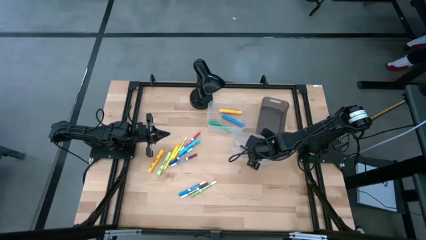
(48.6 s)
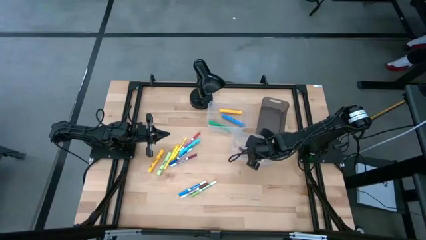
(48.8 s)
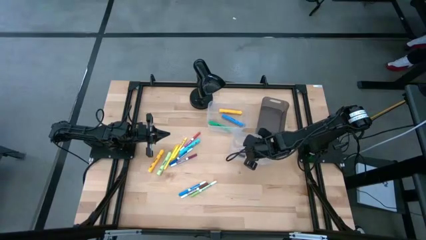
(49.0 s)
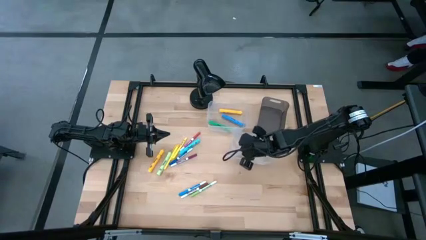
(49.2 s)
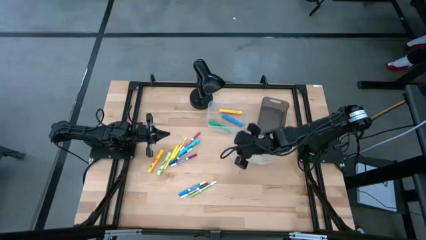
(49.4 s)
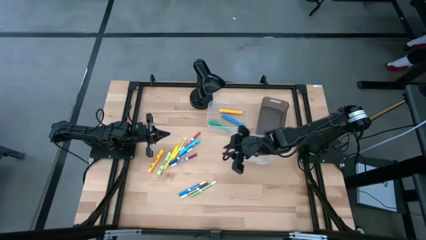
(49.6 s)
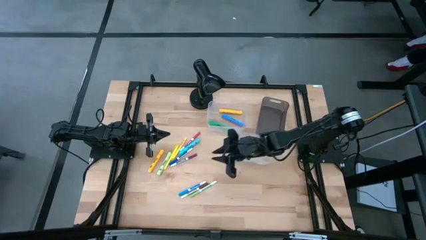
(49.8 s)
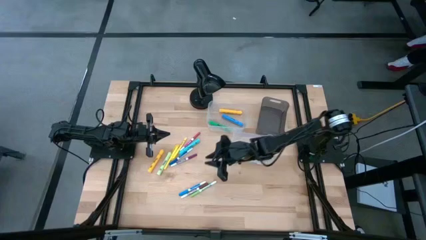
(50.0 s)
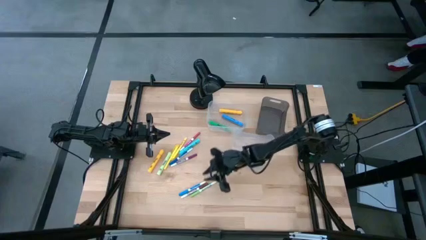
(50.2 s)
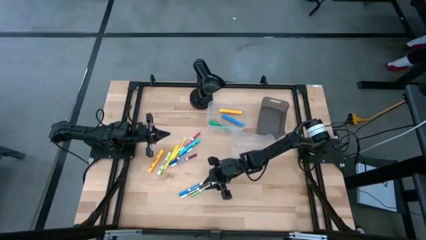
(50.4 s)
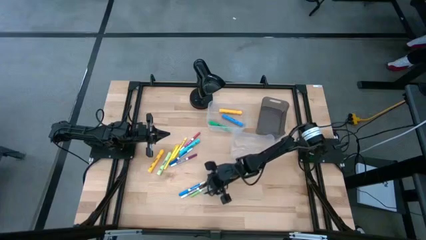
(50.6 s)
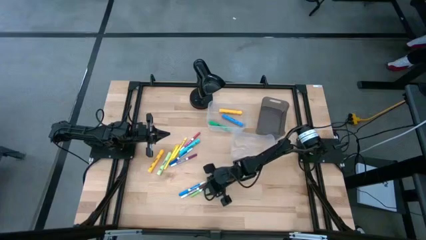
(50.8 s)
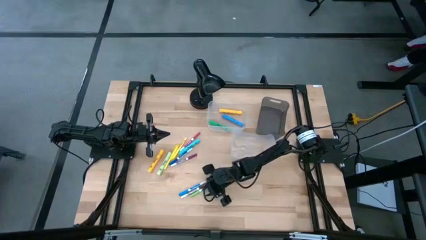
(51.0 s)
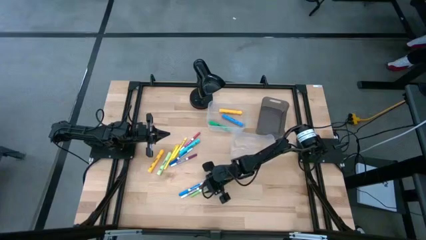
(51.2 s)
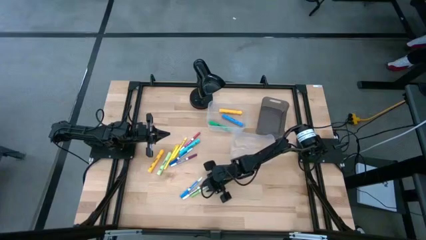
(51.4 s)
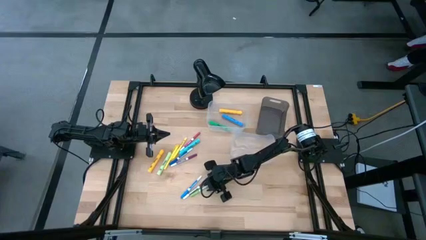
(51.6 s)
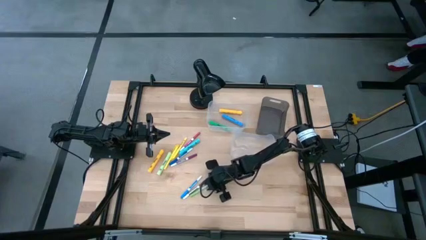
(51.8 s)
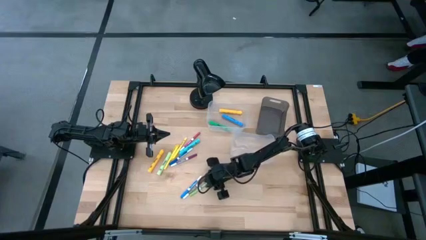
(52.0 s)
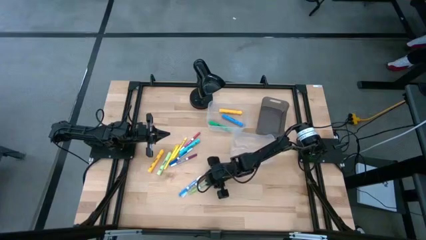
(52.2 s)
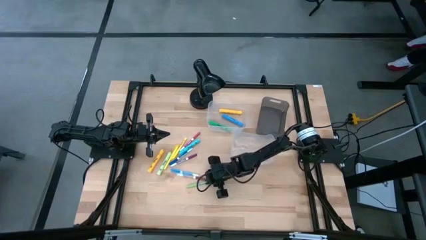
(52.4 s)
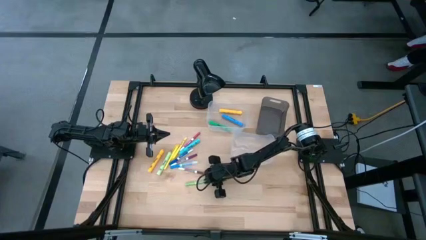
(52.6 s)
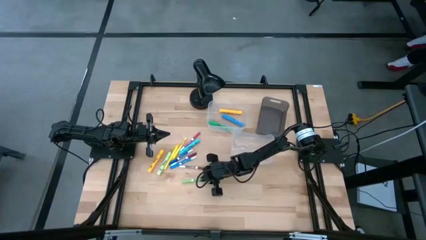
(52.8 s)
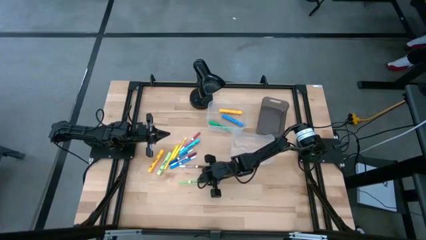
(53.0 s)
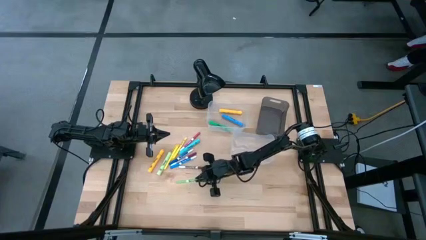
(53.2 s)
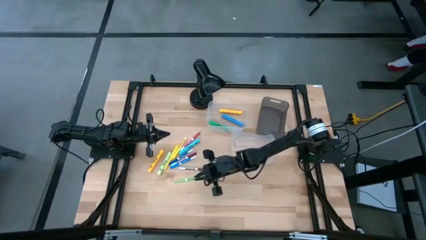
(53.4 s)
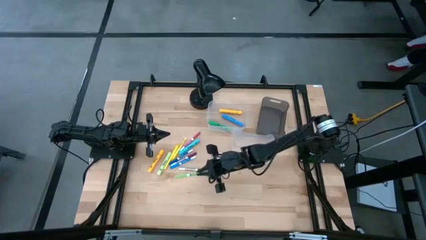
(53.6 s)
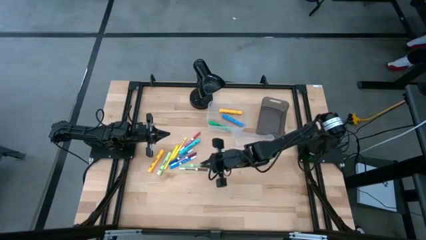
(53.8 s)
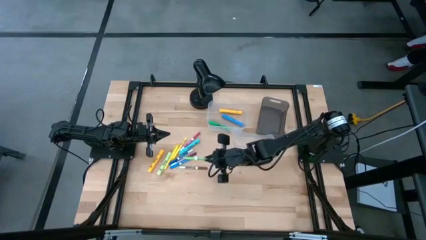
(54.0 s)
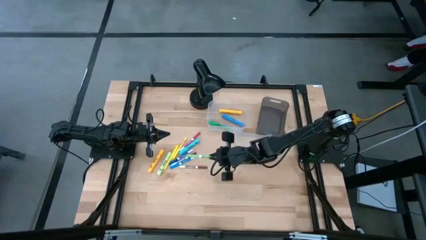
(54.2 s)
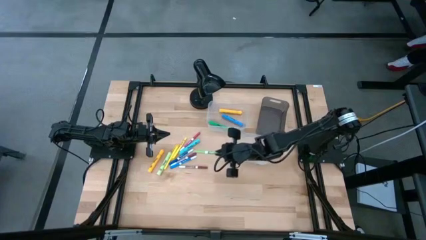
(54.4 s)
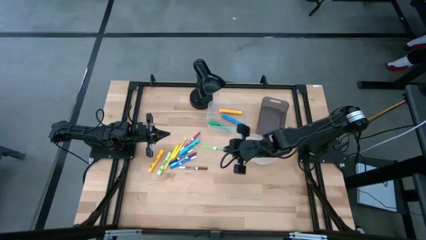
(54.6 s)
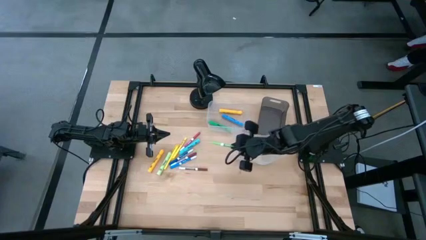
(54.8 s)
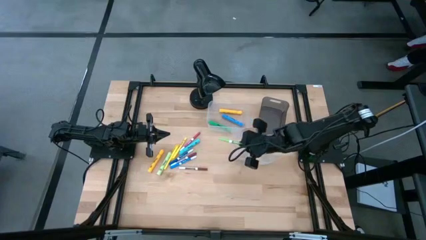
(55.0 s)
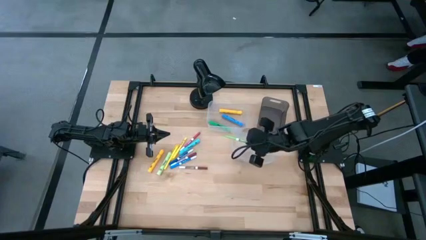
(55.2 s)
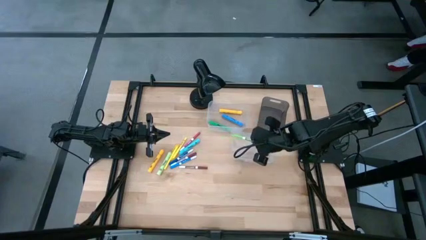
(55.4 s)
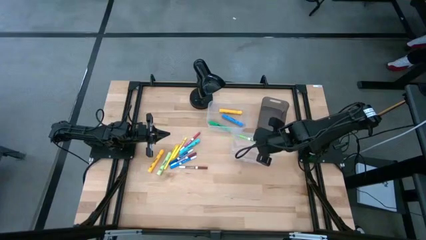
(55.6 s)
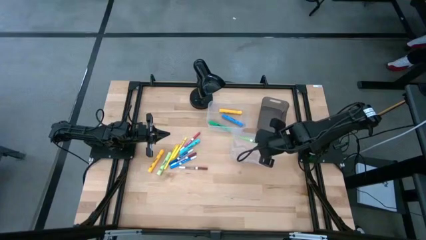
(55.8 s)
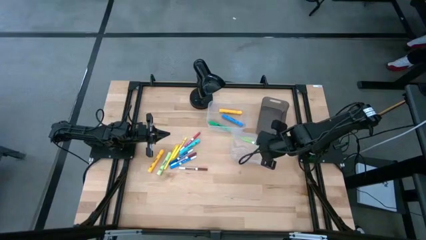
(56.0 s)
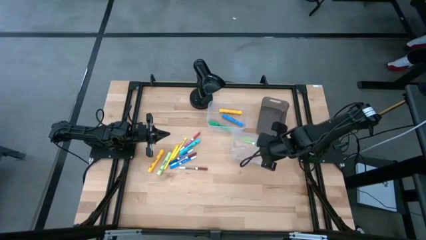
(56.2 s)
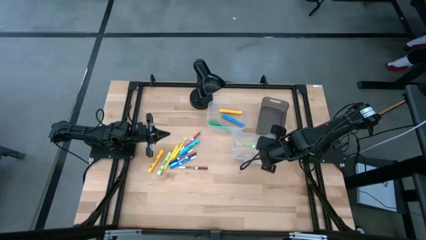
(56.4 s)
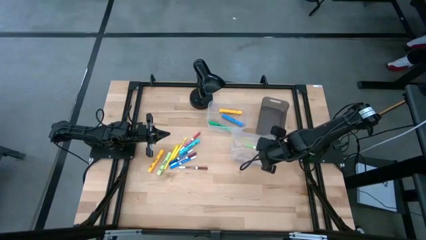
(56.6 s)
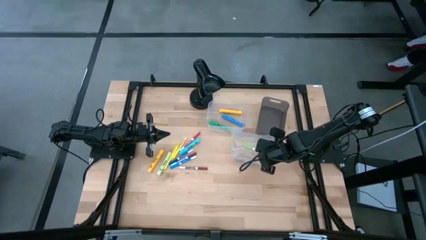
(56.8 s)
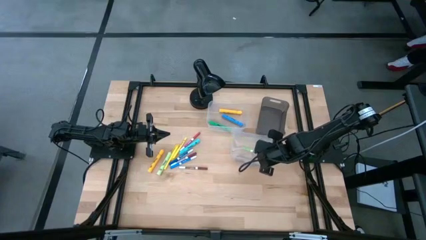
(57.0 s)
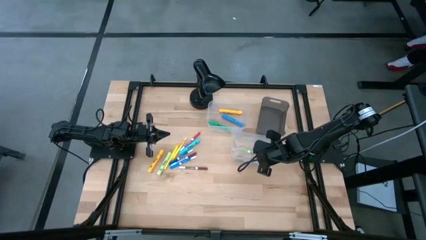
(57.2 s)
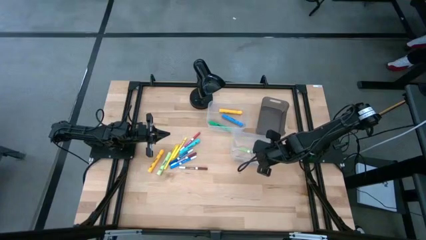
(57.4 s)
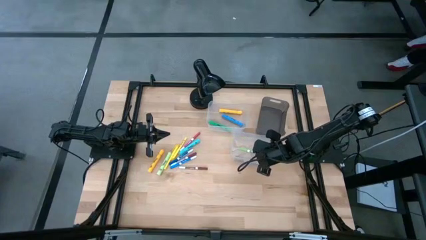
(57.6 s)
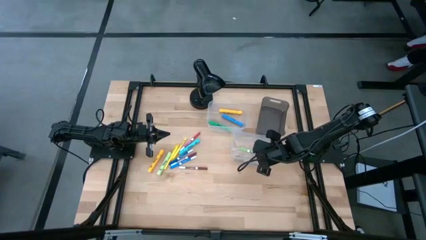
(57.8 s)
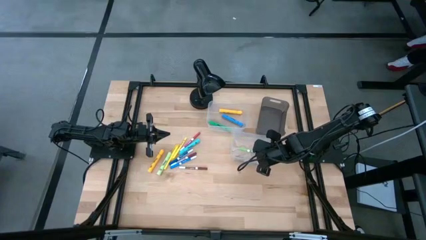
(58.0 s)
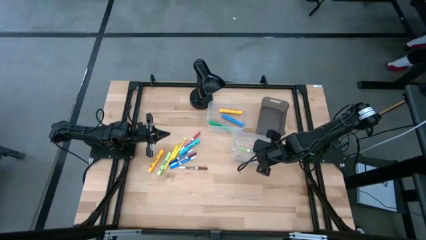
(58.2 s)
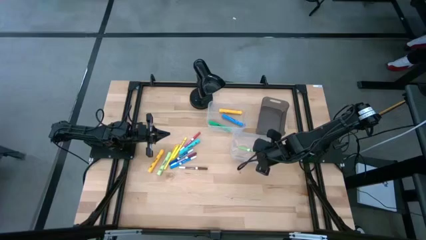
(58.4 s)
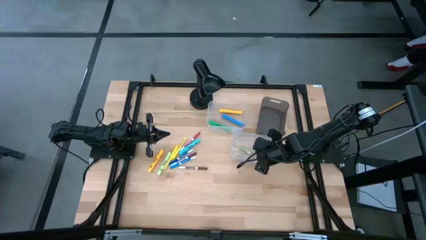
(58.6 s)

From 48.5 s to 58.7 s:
Task: Pick & Place Markers
Put the green marker pen into the bottom transparent bin

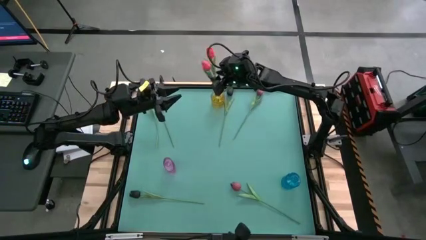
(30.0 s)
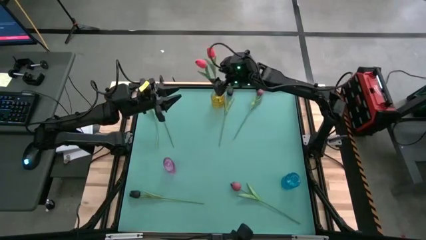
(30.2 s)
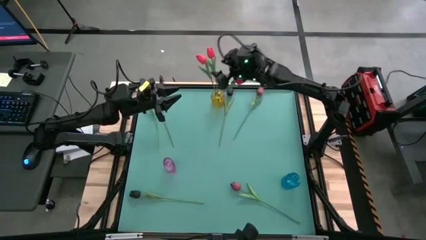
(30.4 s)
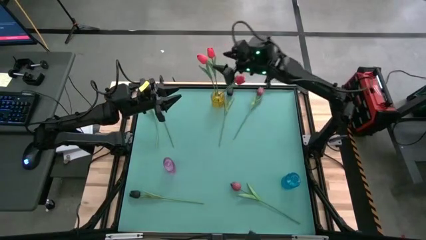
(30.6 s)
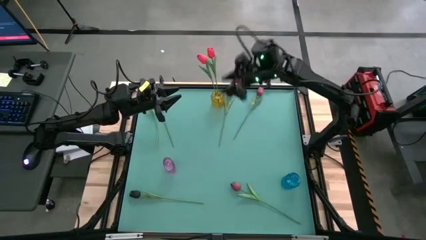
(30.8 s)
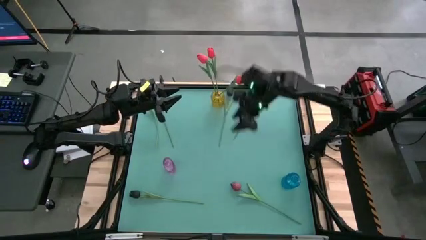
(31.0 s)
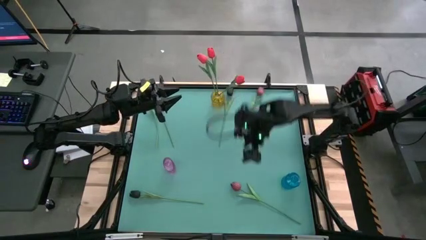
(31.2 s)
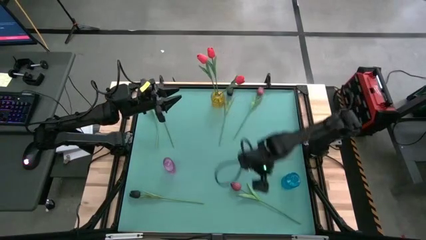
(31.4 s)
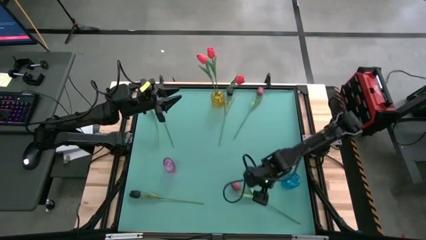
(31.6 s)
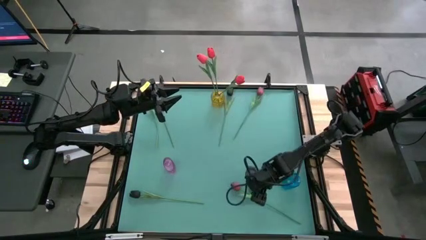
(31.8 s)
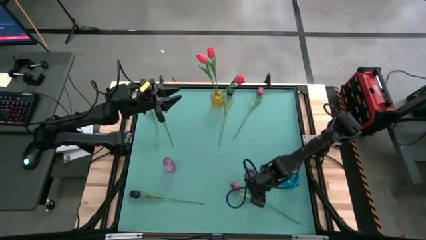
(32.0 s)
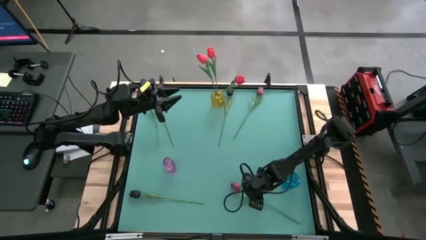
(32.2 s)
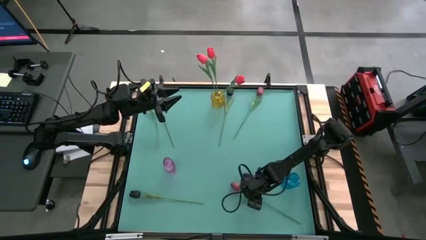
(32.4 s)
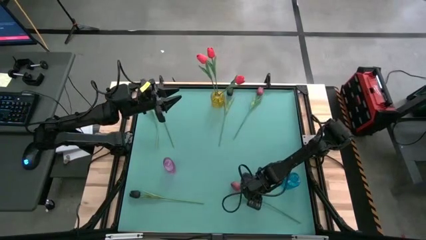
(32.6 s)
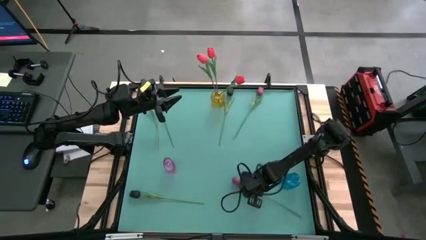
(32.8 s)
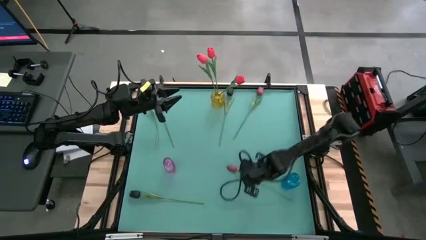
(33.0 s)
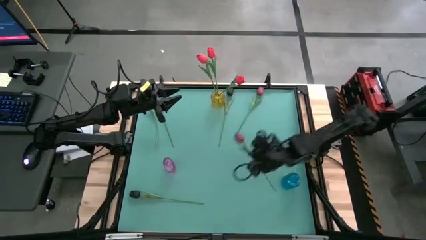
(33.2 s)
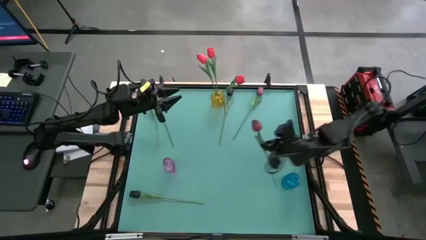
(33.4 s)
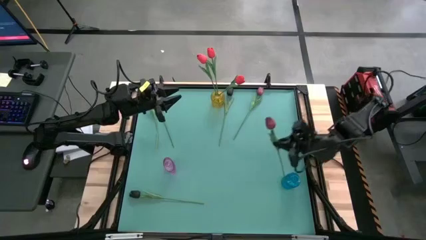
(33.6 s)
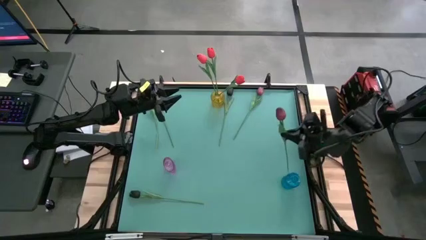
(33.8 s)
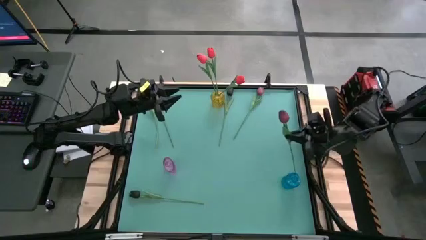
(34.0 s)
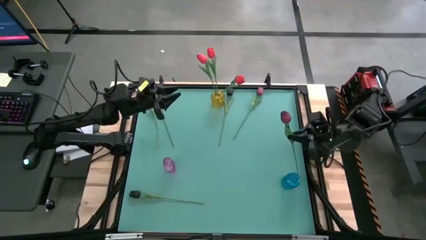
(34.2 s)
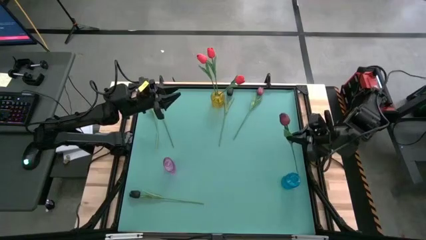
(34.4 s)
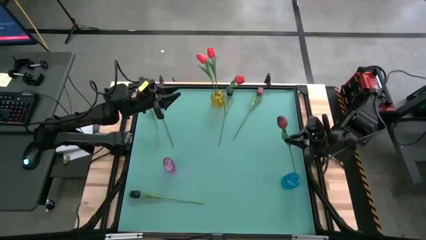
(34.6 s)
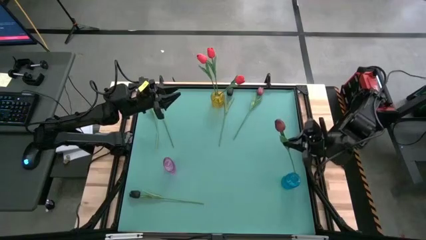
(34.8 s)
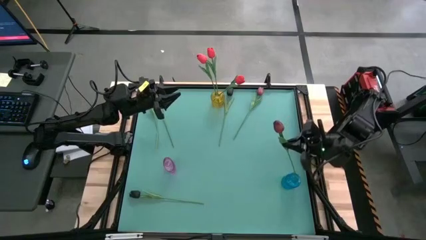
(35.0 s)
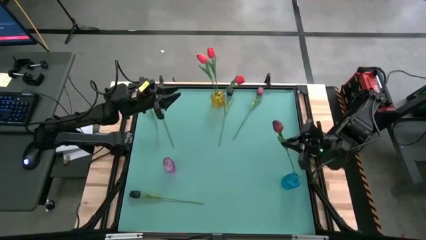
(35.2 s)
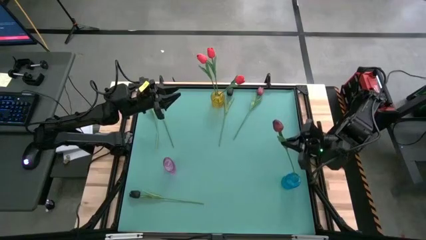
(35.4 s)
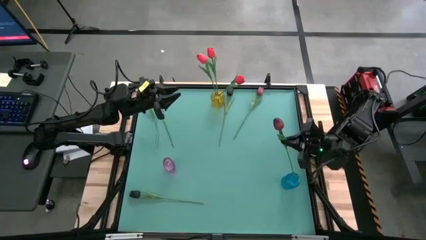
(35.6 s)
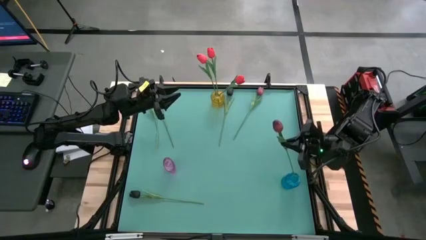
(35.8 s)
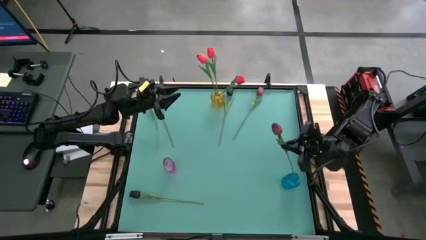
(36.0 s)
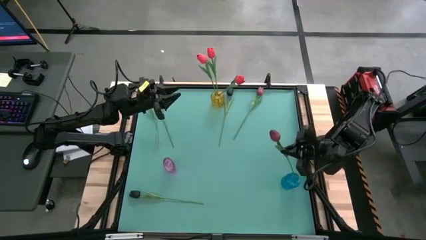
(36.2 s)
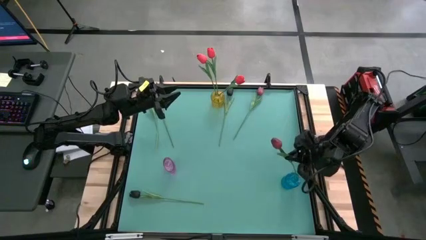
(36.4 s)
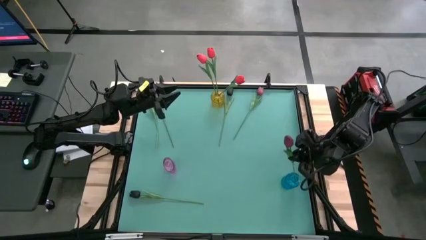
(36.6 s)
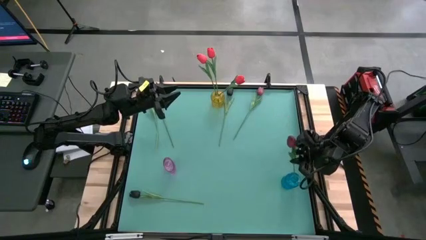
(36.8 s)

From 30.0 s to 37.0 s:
Task: Sort flowers into vase by color
Put the bottom dark red tulip into the blue vase
